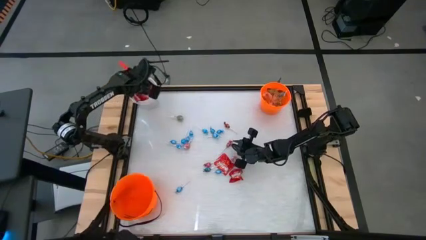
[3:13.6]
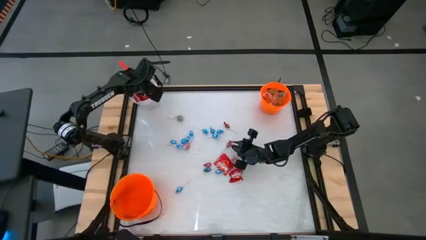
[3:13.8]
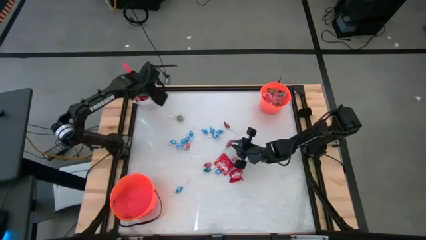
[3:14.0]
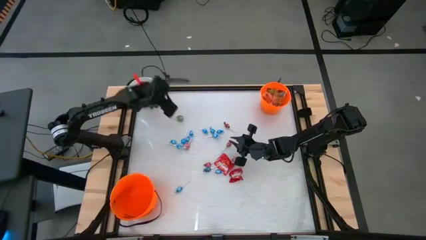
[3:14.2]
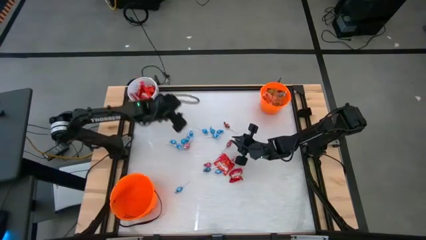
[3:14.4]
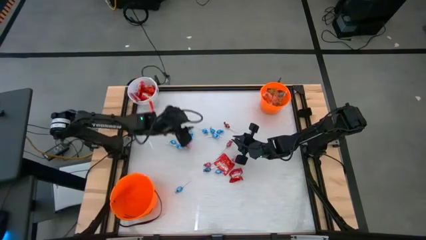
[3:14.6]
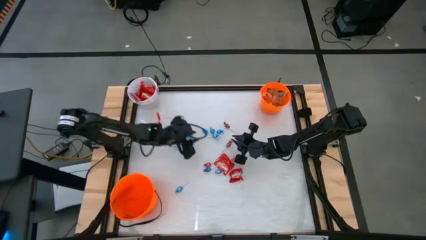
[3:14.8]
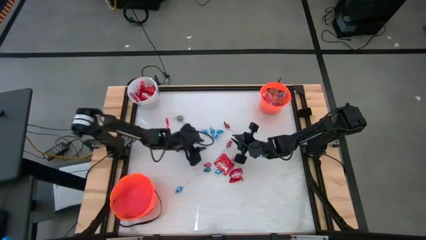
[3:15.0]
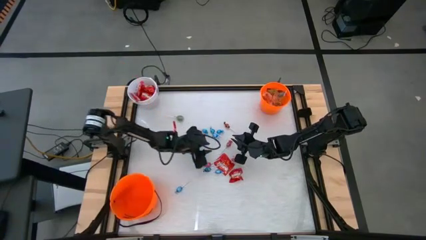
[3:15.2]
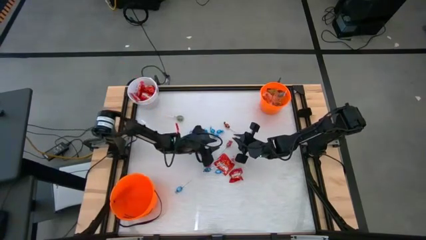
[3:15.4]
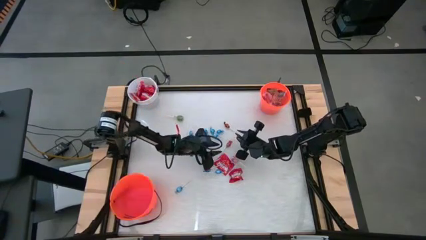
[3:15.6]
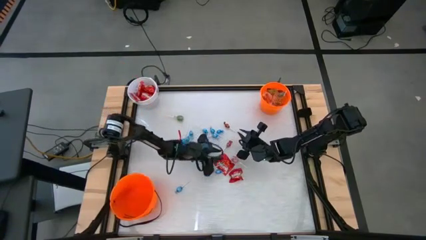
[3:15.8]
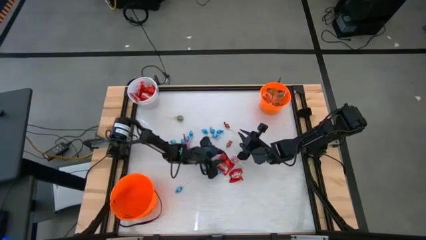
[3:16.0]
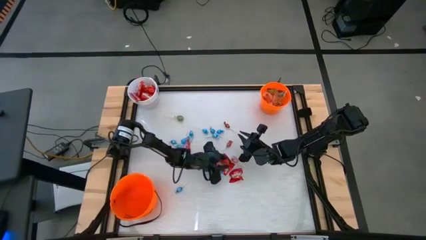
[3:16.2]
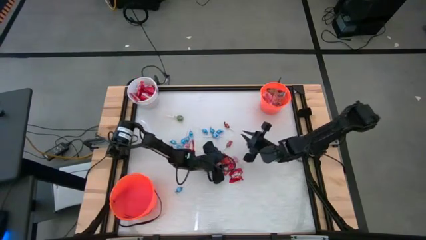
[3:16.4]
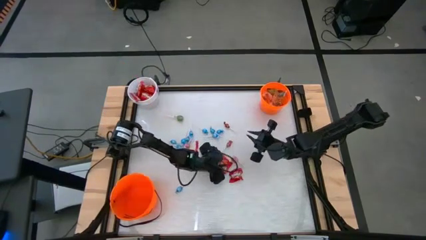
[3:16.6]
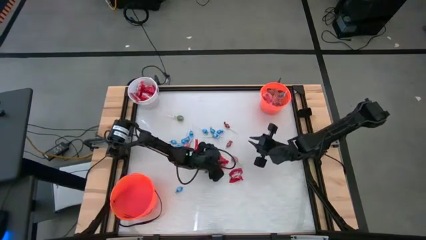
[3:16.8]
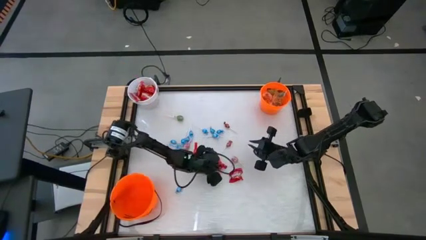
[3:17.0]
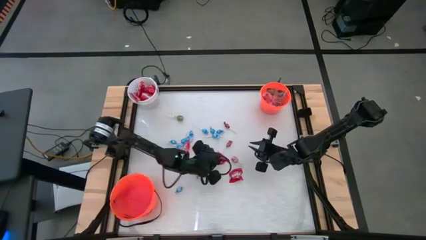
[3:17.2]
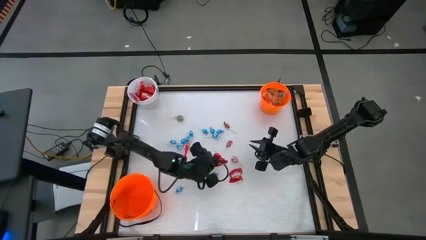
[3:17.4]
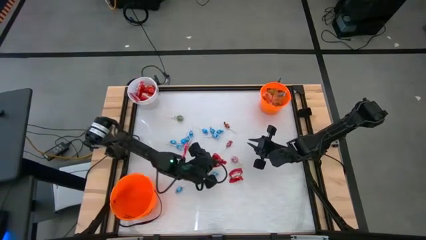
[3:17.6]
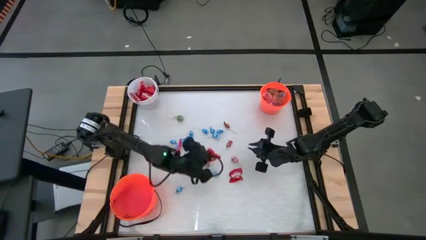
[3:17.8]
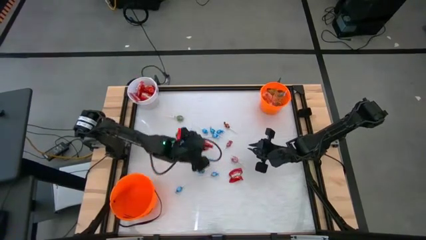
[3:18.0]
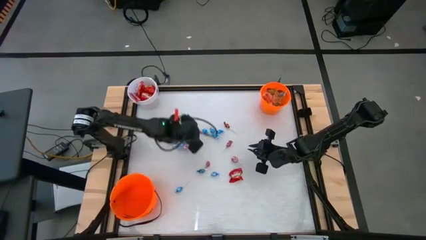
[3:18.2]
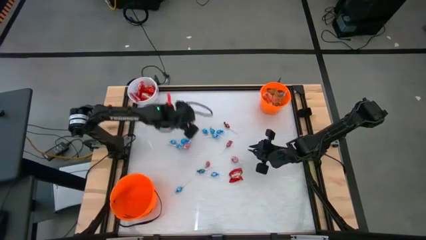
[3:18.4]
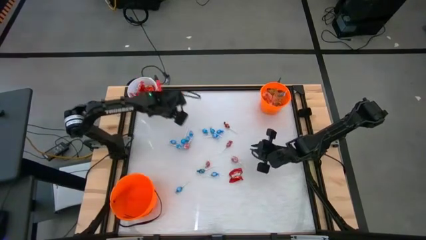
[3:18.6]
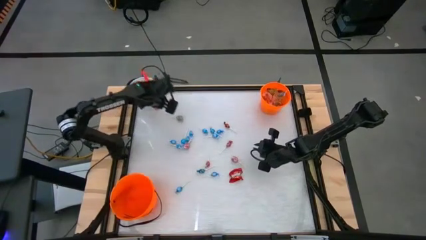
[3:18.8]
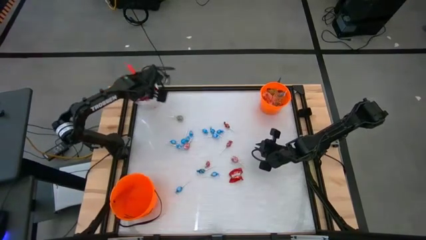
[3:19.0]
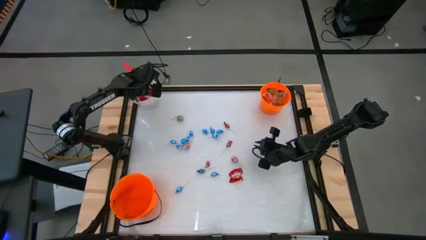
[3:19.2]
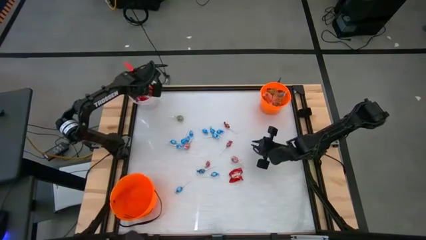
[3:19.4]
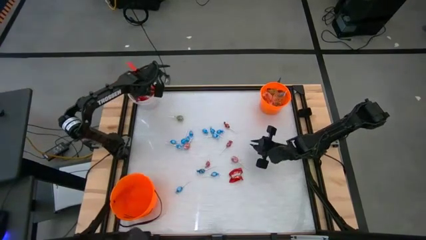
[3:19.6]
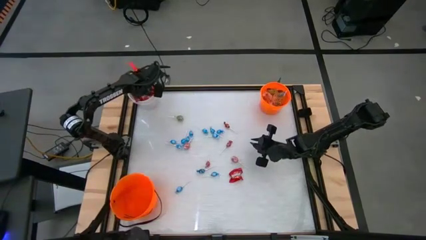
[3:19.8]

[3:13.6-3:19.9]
Task: Sort candy by brand, put in halloween buckets
Put the top red candy pack into the white bucket

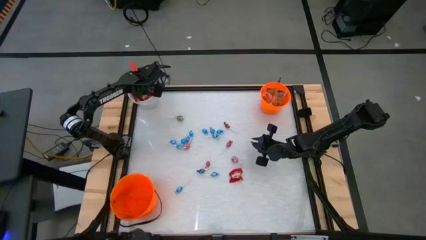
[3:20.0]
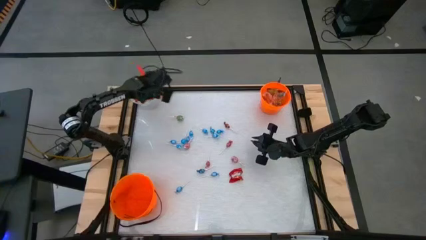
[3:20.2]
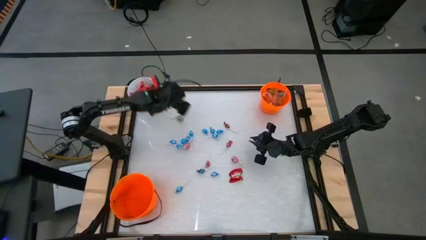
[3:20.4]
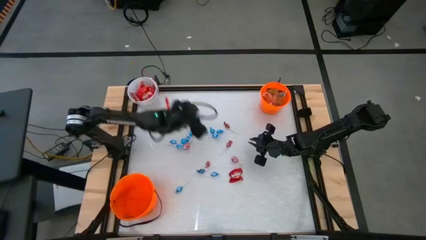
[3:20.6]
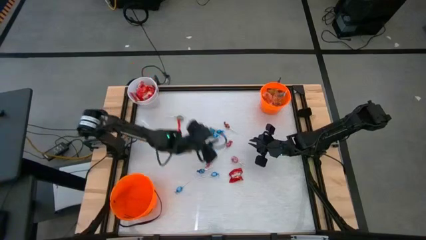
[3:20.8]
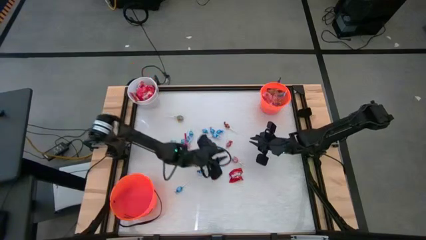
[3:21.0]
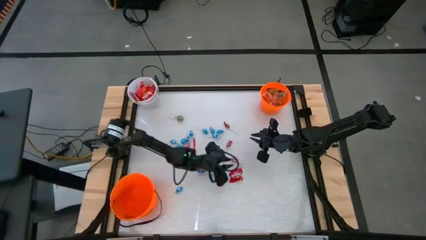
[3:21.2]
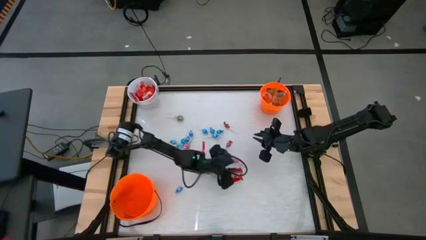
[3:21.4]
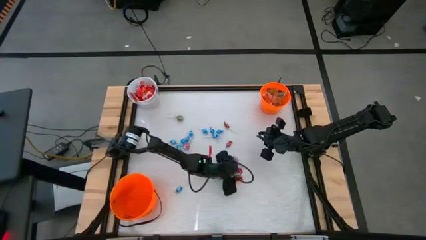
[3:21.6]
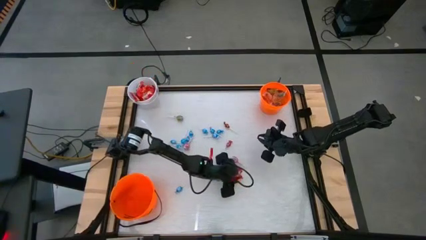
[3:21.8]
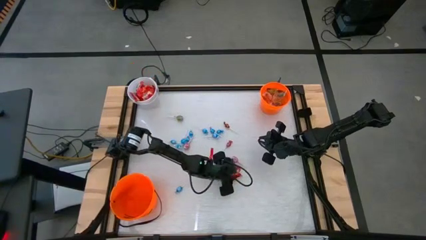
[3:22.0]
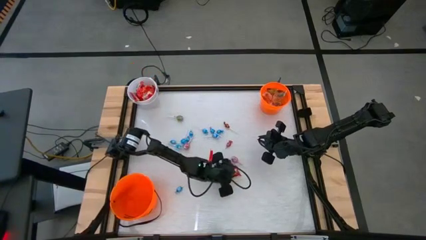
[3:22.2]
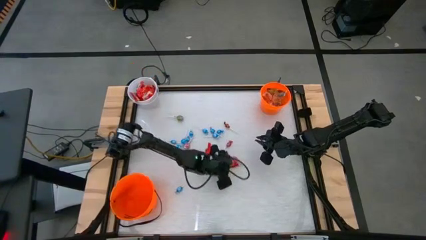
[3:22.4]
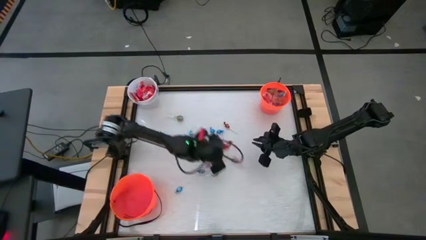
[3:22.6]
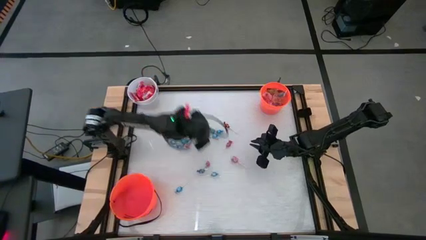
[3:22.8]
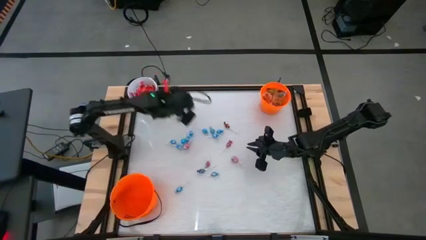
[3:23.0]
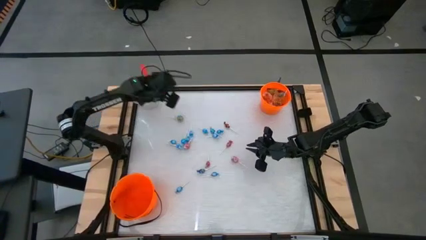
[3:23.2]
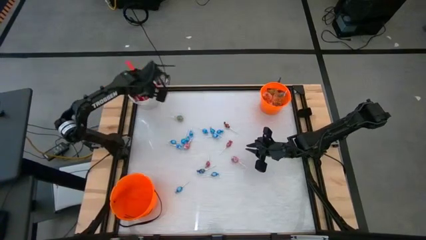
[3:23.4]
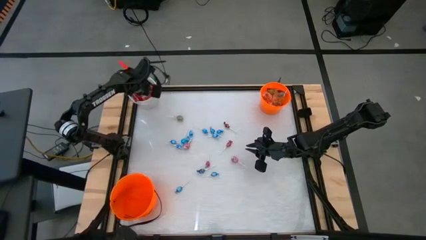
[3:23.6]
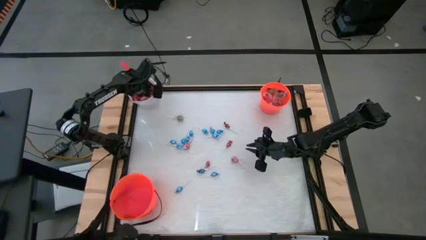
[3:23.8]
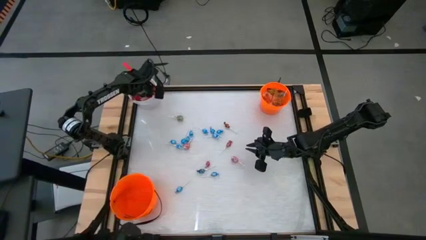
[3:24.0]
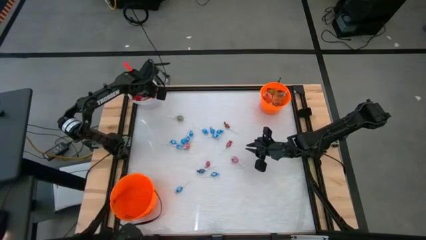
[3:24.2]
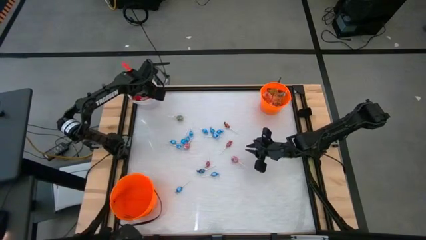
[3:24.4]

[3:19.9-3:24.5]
Put the red candy pack into the white bucket

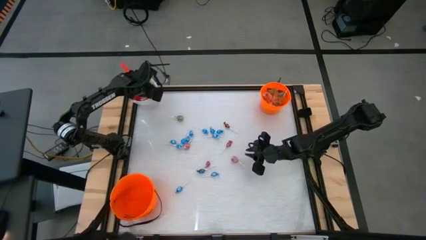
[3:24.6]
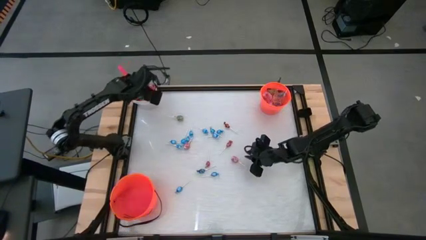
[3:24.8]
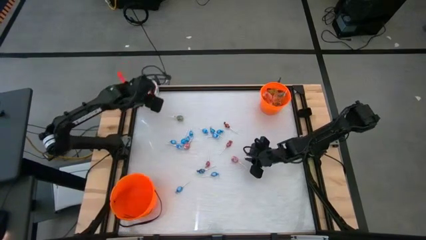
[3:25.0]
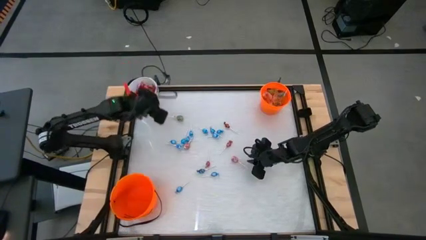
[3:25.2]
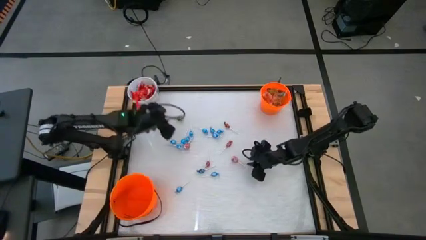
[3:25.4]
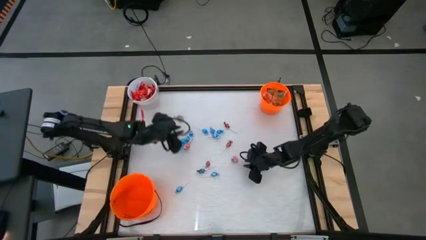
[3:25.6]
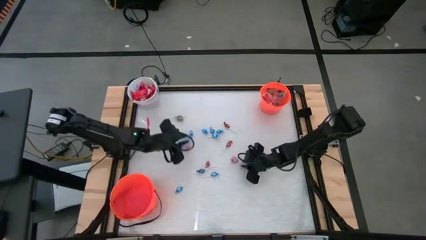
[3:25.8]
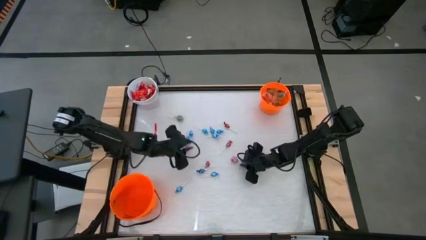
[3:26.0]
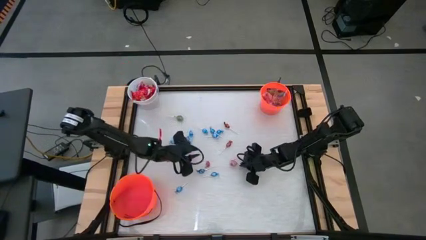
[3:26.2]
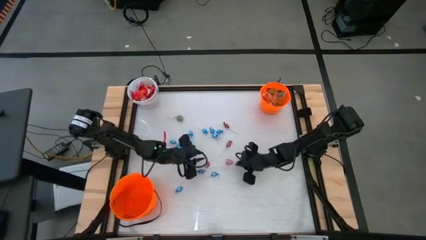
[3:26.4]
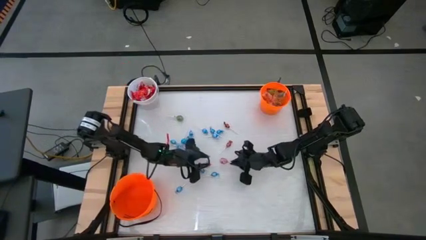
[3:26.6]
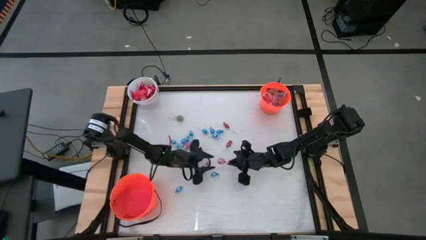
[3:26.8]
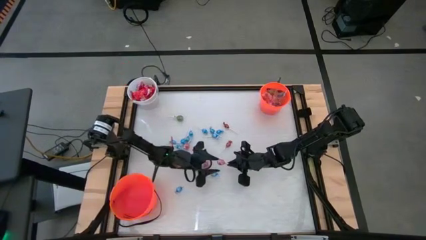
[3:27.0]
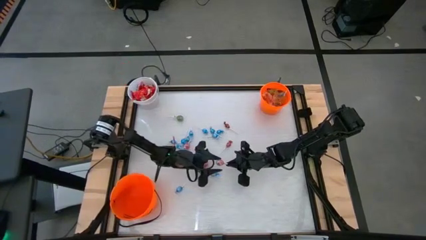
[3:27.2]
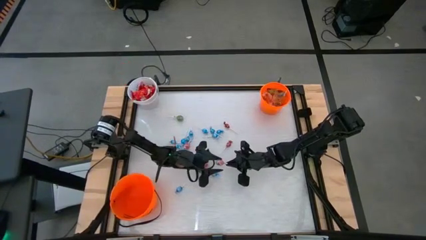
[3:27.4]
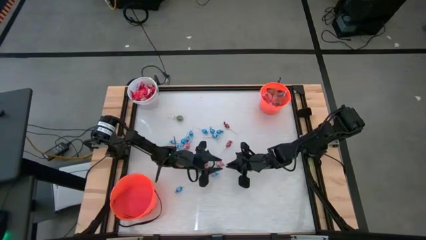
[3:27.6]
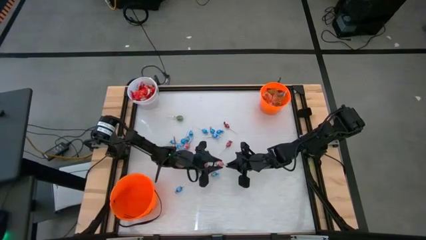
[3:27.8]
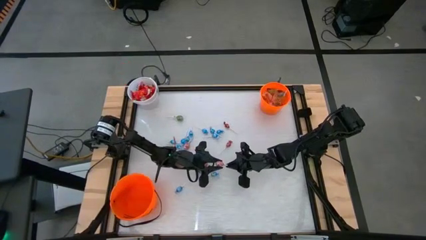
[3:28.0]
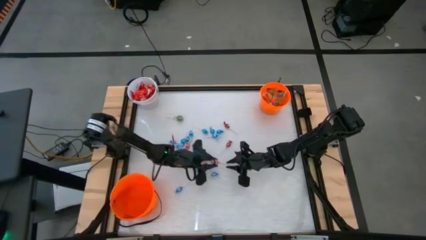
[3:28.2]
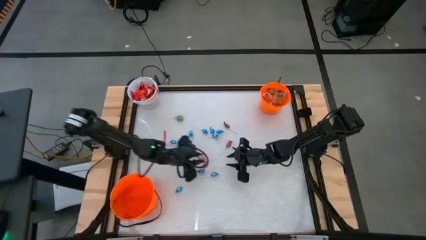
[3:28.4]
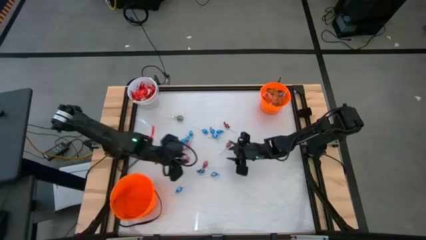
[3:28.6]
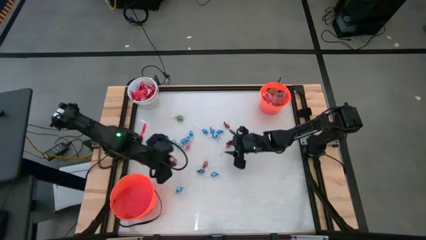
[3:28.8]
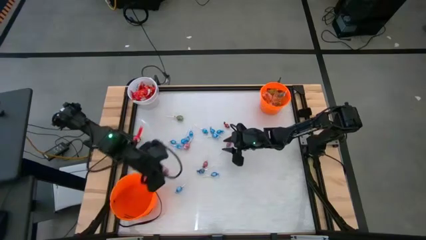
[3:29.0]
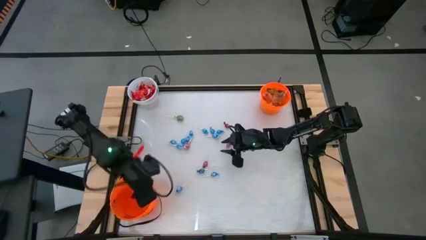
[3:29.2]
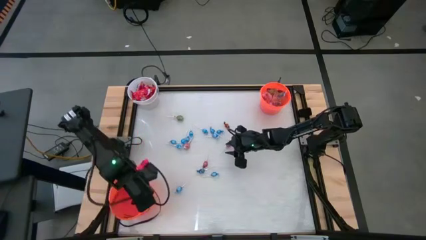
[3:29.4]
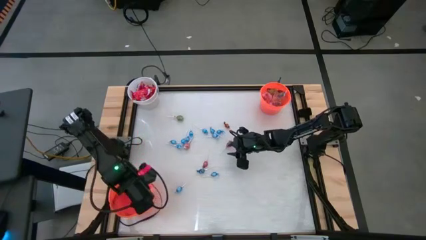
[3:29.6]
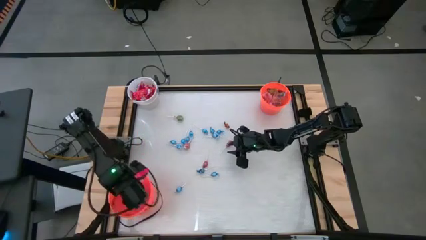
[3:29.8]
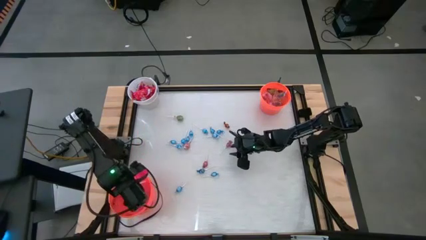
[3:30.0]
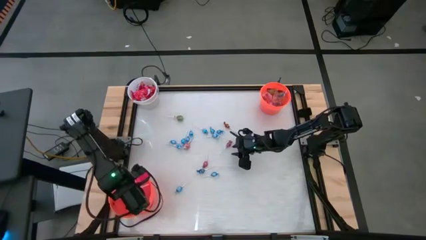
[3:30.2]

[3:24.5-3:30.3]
Put the pink lollipop into the bottom orange bucket

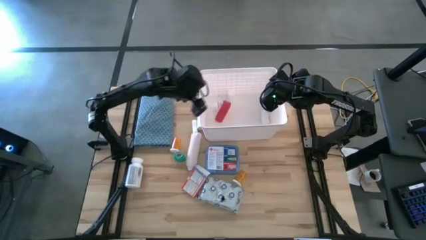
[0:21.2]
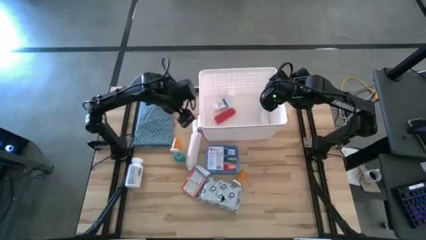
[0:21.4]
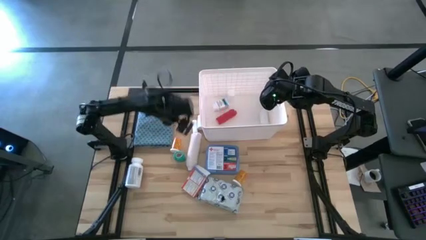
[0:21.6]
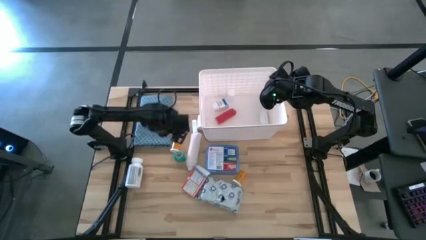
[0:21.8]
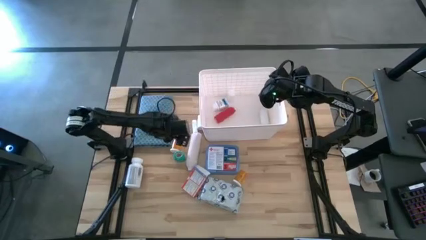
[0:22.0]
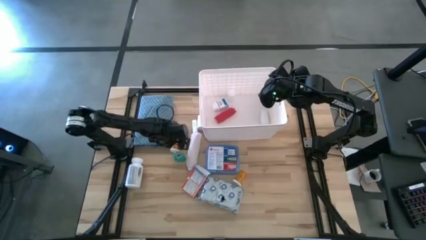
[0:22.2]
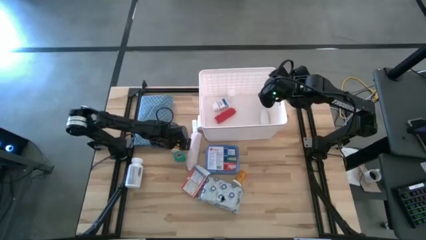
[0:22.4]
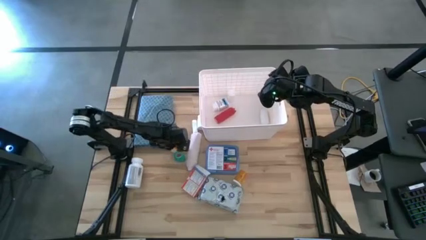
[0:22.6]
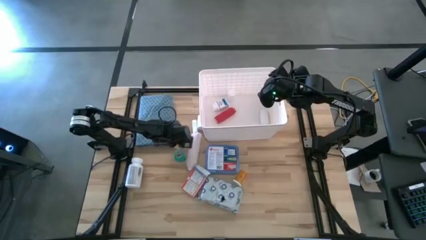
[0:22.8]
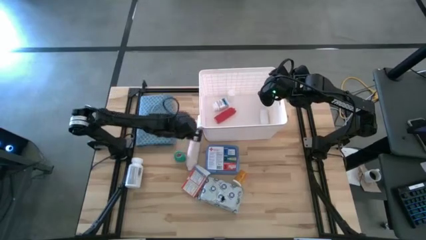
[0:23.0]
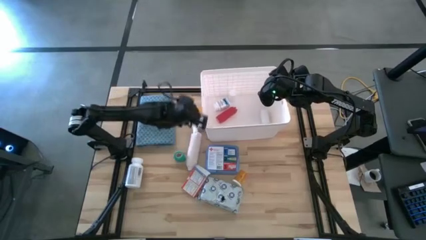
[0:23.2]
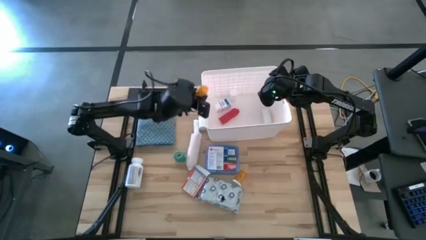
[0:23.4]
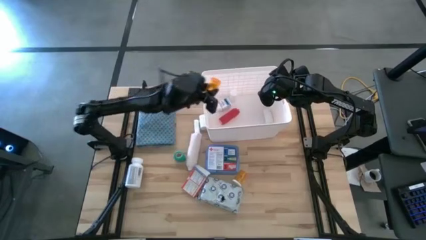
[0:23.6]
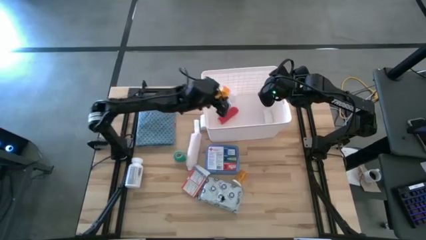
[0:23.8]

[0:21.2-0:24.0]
Task: Pick & place medical supplies in basket/bin
Put the orange pill bottle into the white bin
